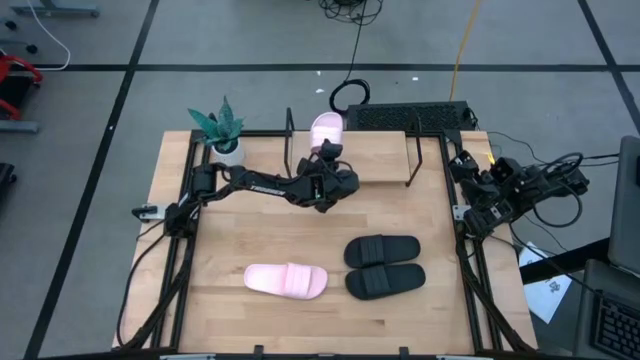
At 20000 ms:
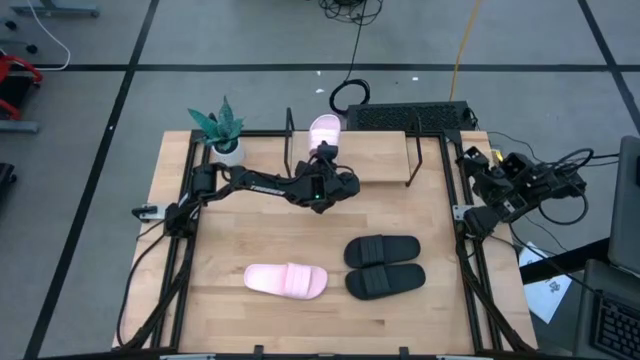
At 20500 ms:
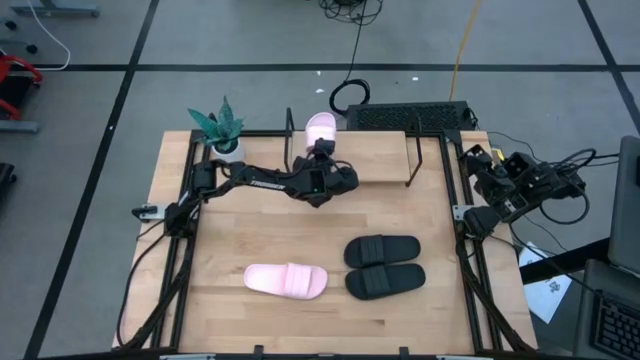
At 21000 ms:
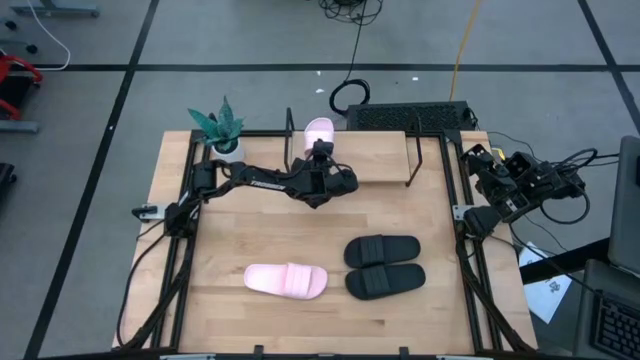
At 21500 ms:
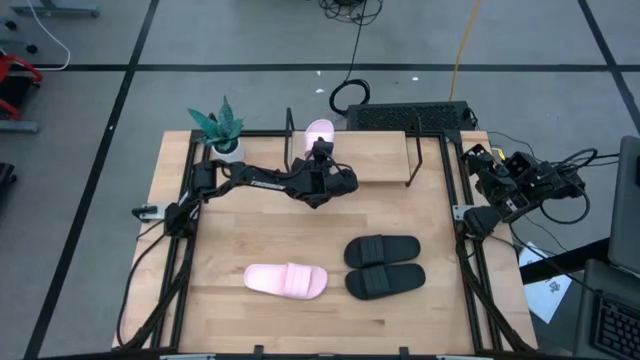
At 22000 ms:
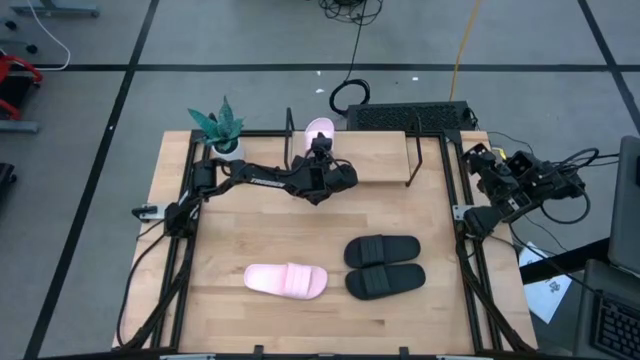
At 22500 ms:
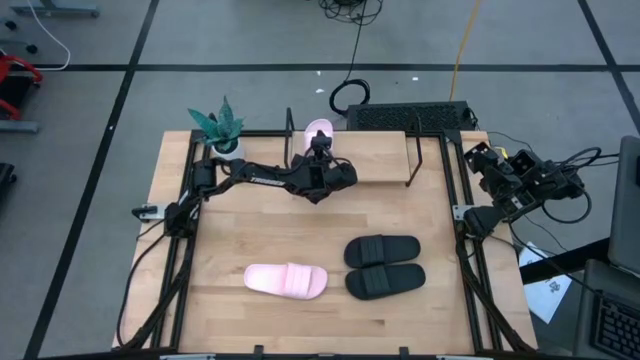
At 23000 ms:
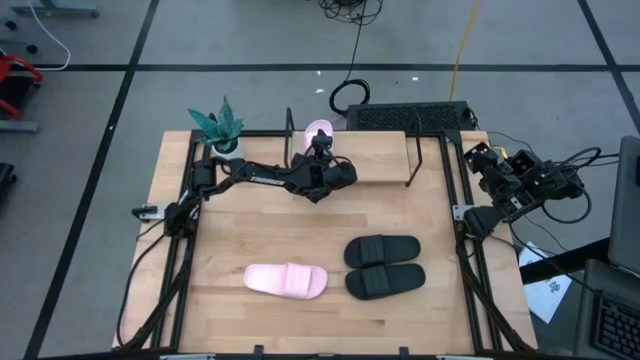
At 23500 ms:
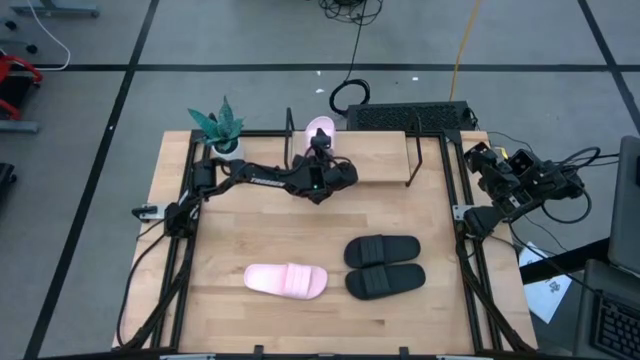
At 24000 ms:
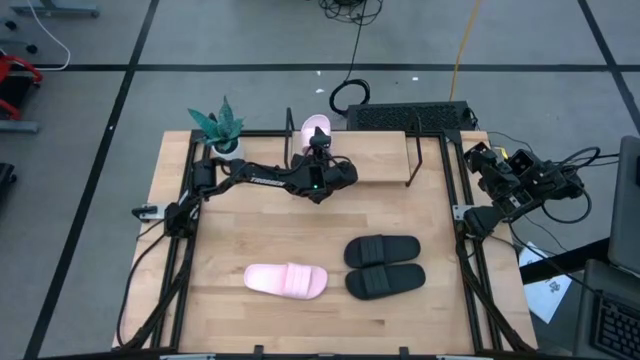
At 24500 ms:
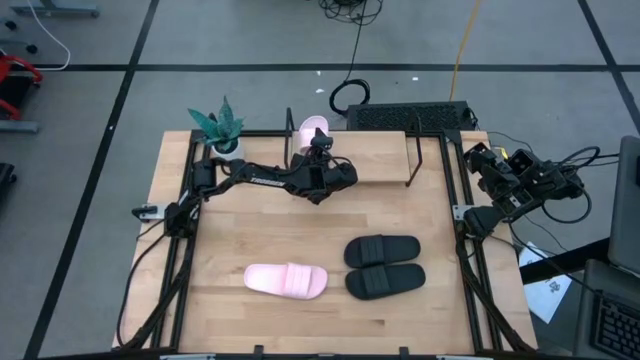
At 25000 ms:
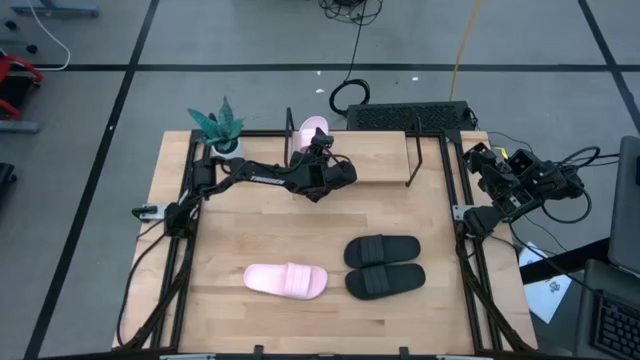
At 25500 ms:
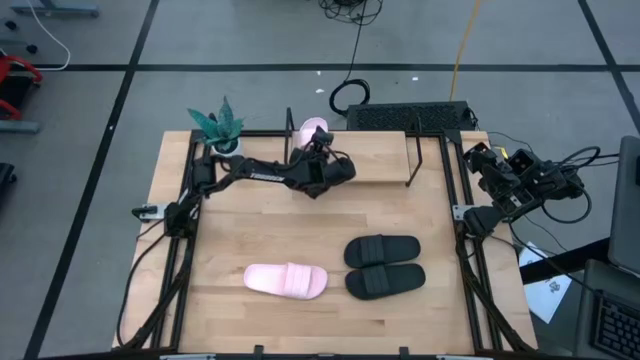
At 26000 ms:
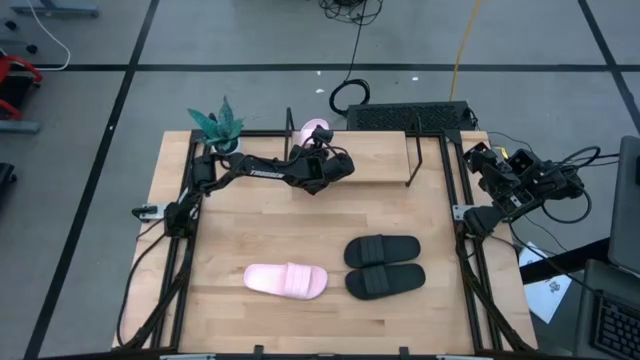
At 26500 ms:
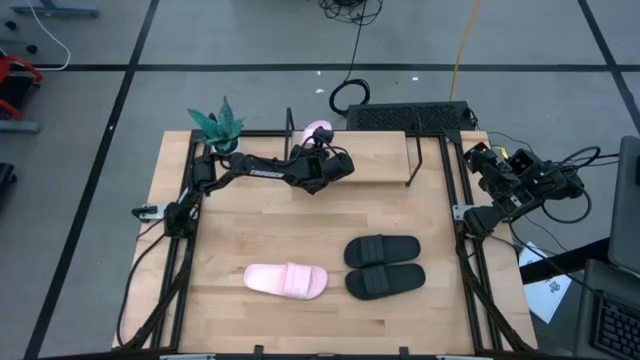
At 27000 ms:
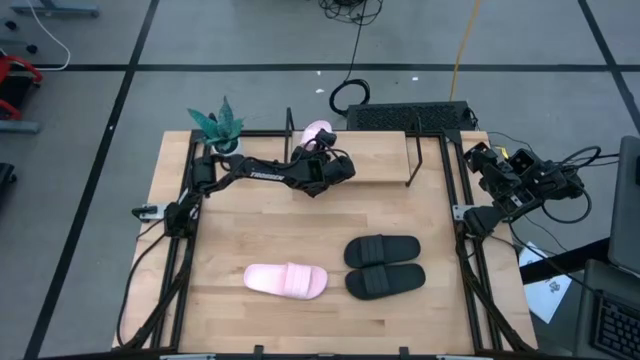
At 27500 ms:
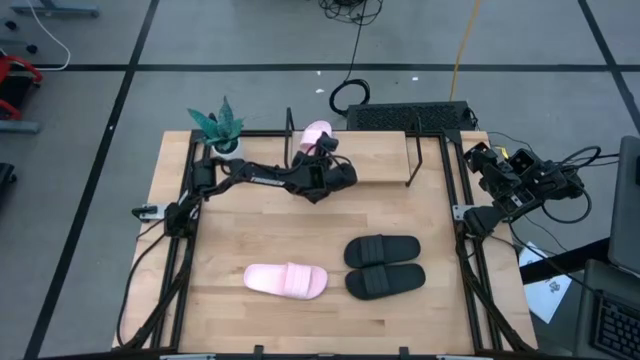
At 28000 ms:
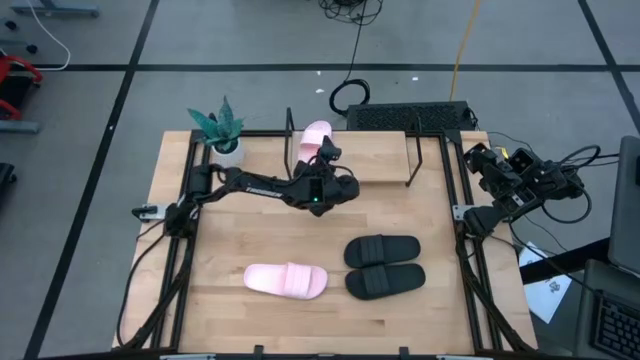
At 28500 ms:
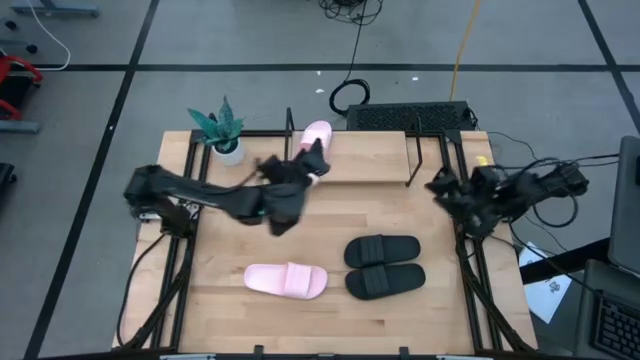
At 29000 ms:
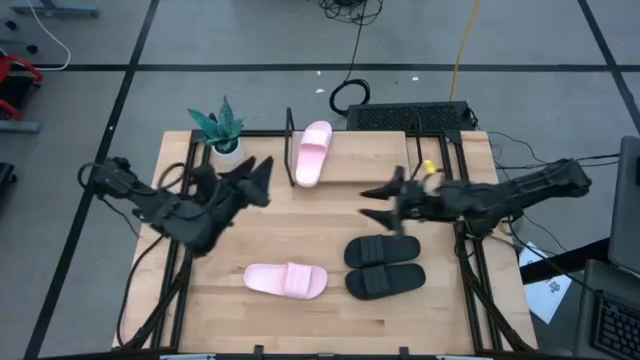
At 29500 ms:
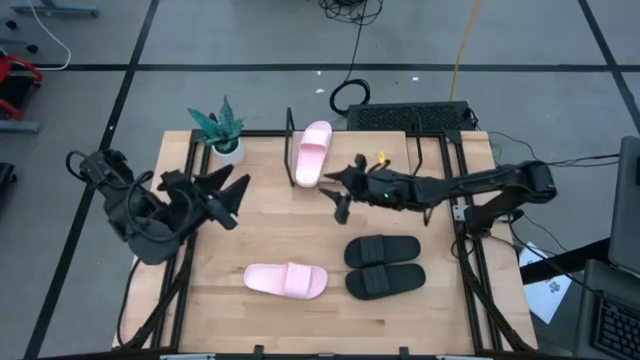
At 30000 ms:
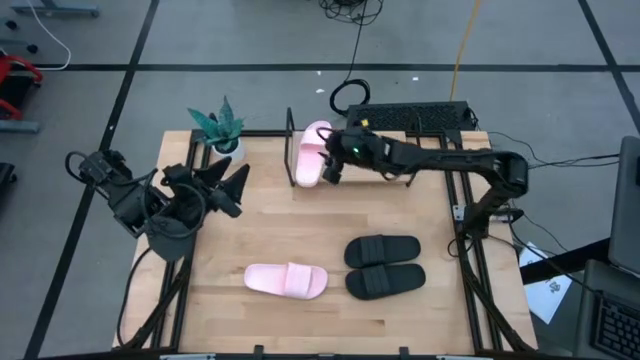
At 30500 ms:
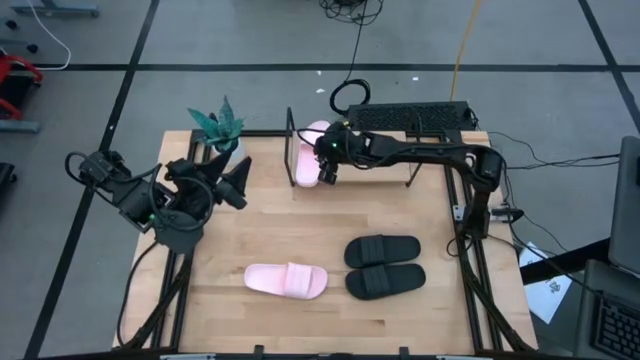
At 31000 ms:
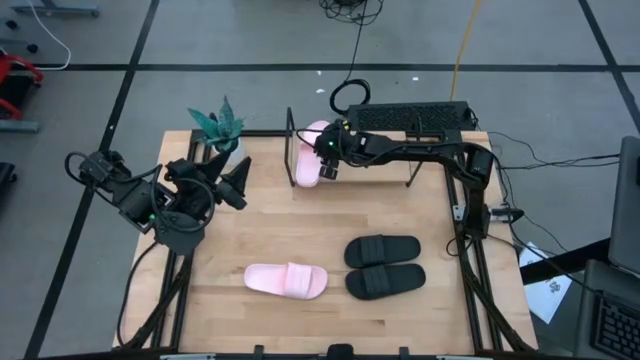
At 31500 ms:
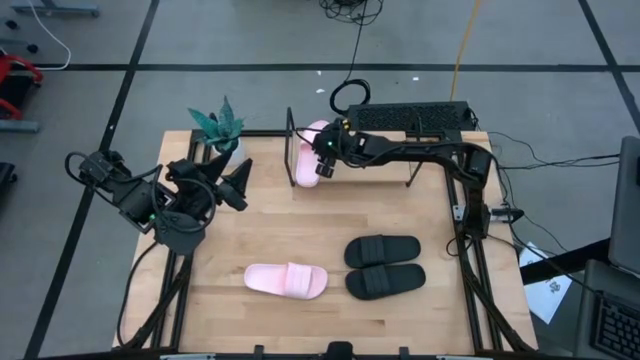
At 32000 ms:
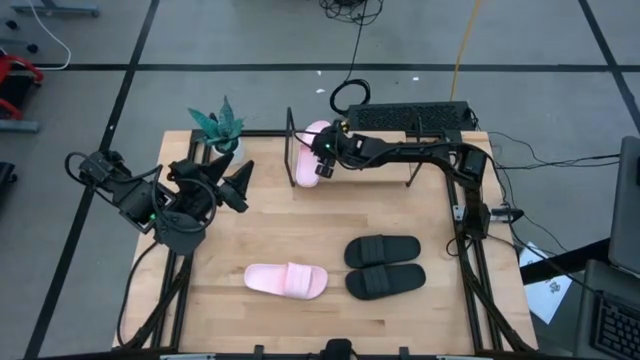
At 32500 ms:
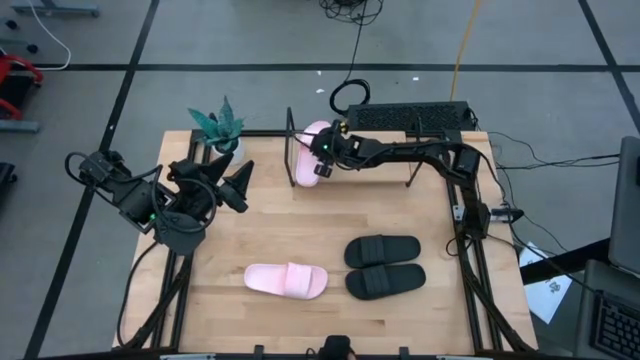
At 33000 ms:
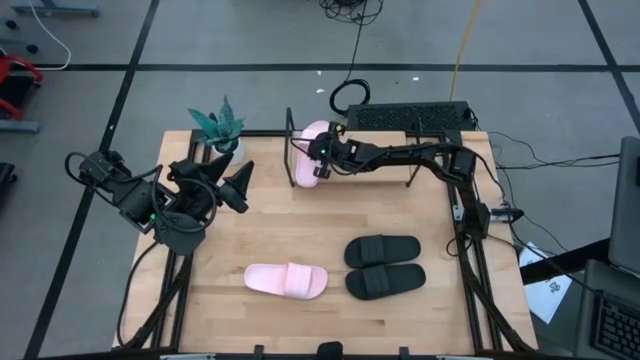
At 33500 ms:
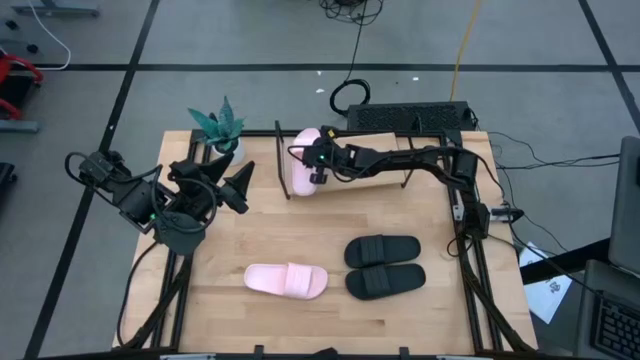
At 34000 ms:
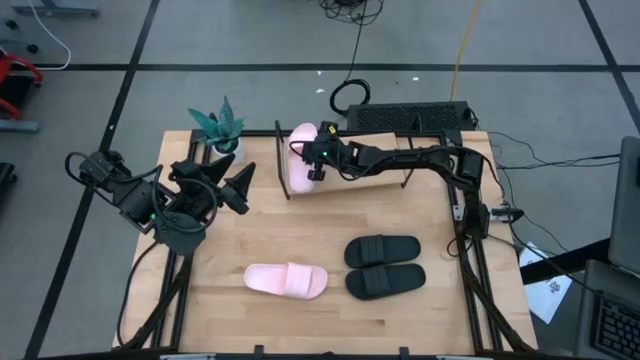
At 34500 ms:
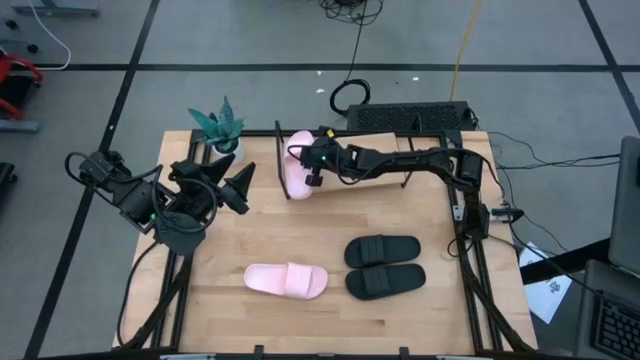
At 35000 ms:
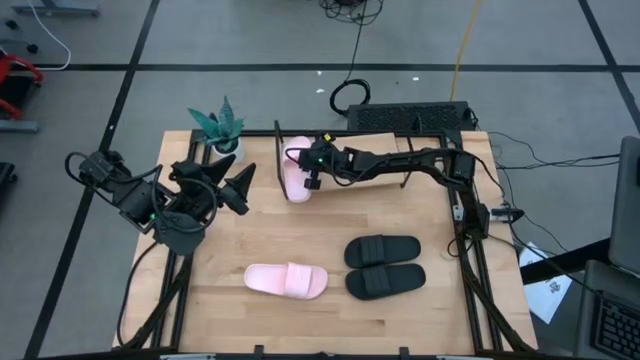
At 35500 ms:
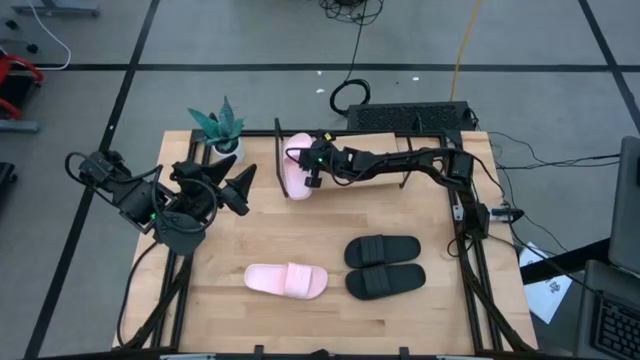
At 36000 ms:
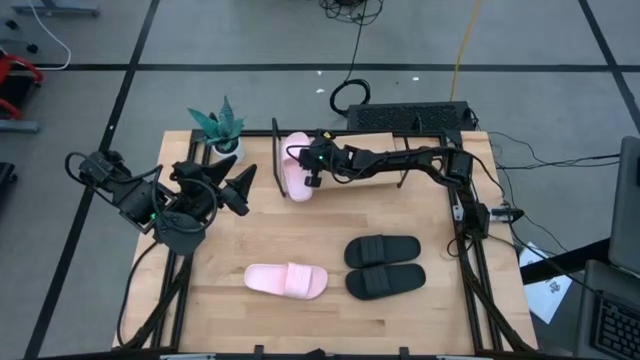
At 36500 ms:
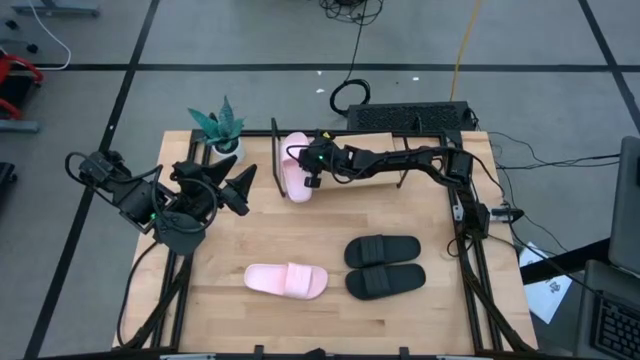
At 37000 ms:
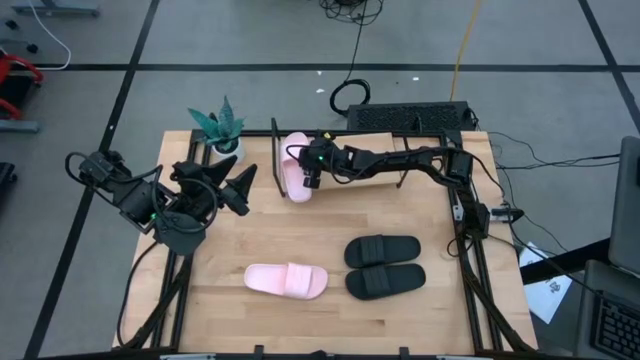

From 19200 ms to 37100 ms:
Task: Pick and place slides into the shelf
Put the top pink slide on the shelf

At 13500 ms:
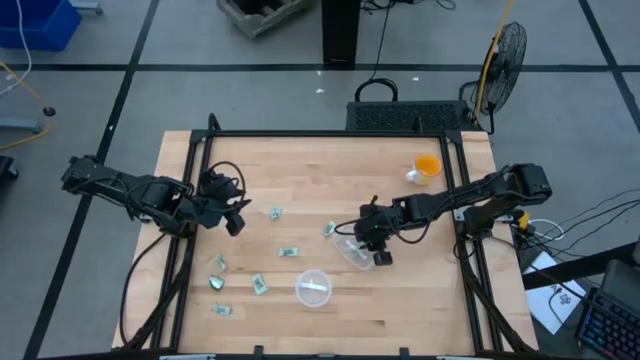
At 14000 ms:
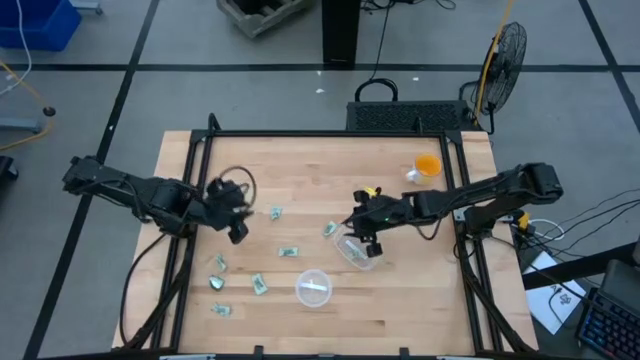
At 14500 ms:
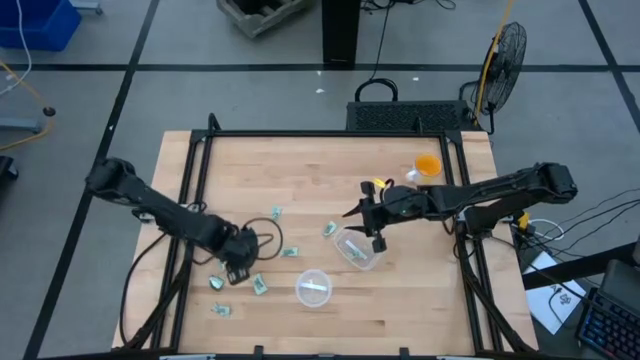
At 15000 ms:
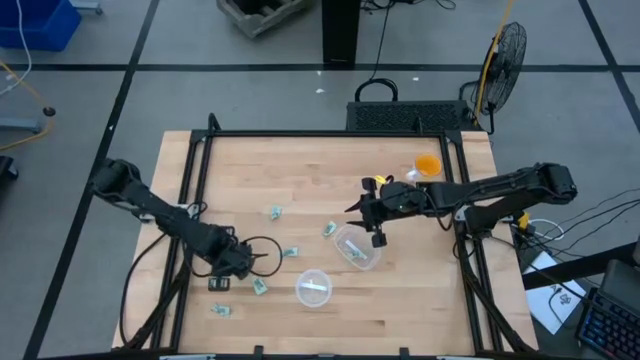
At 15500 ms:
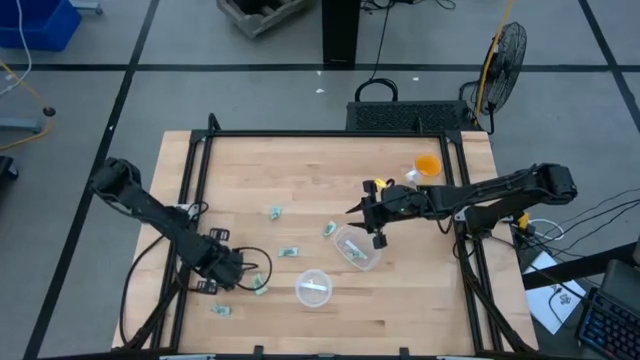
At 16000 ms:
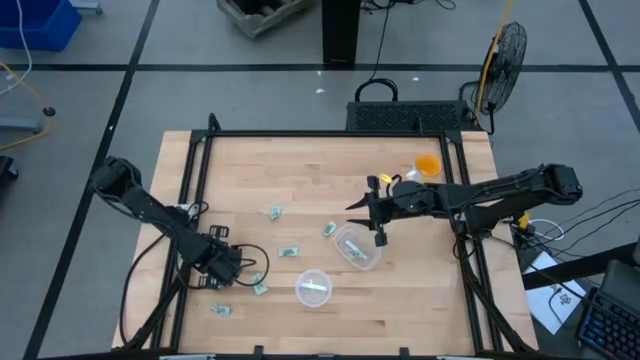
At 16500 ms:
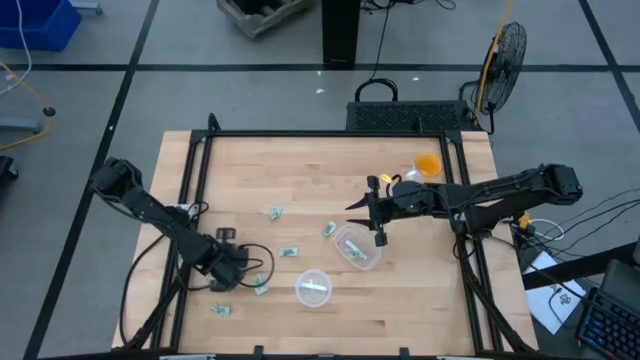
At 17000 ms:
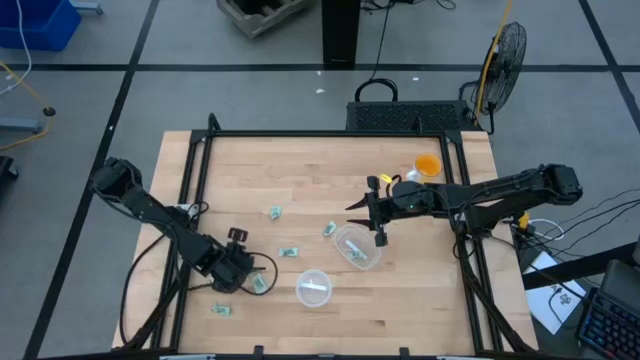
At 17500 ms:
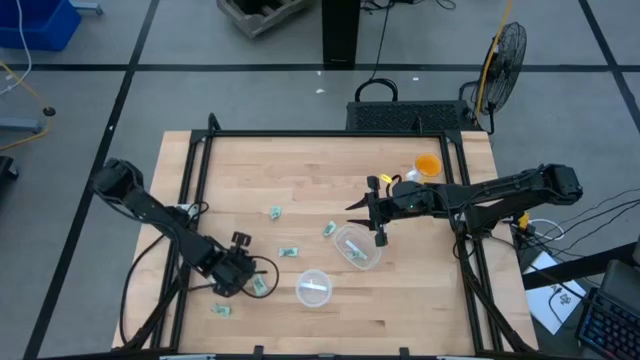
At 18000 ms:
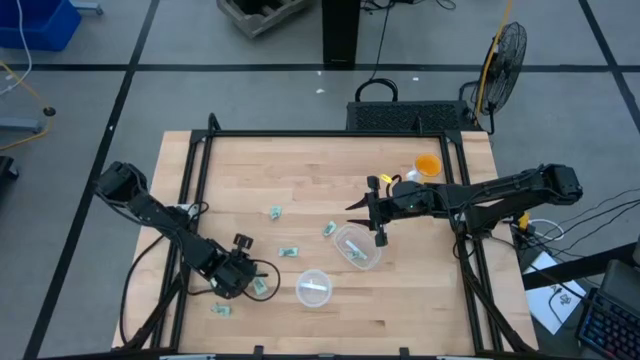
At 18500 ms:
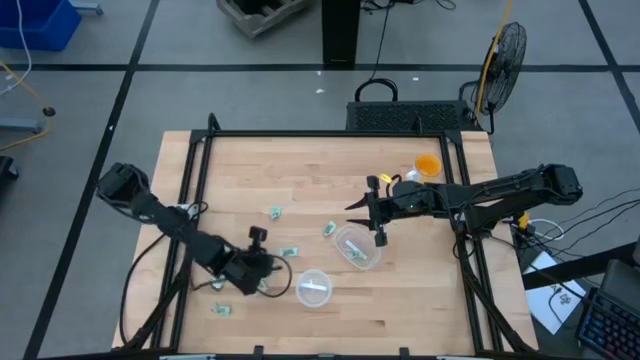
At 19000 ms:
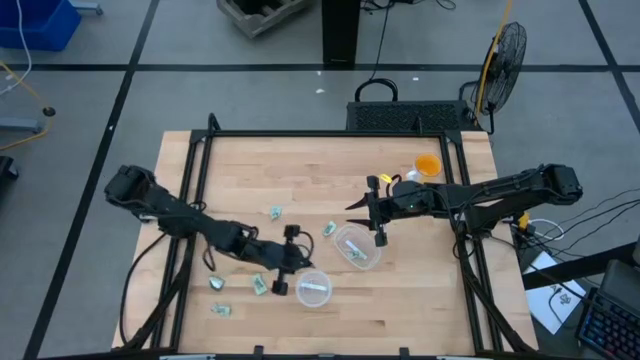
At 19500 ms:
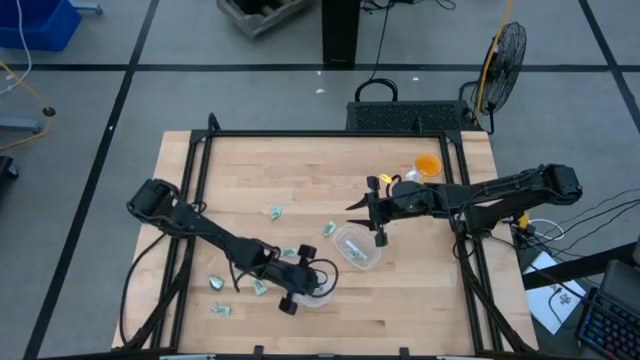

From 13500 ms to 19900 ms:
Task: Pick and place items into bin
Put the Stevia packet into the left transparent bin
